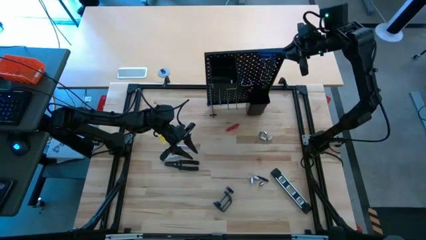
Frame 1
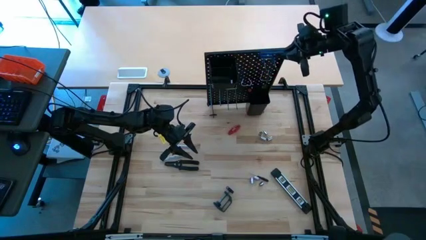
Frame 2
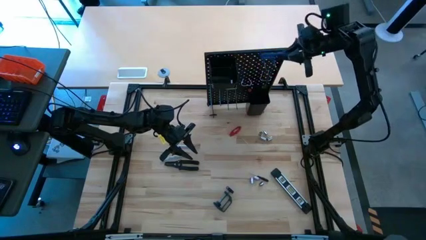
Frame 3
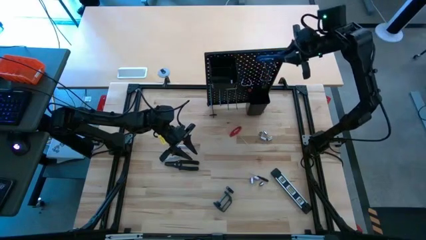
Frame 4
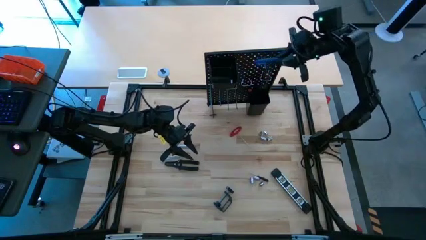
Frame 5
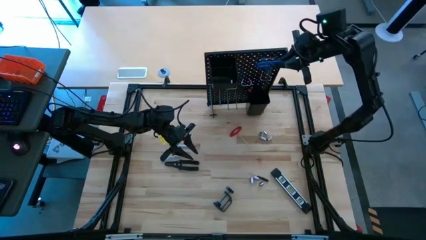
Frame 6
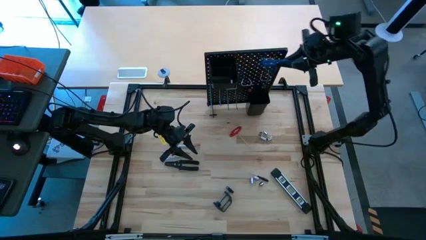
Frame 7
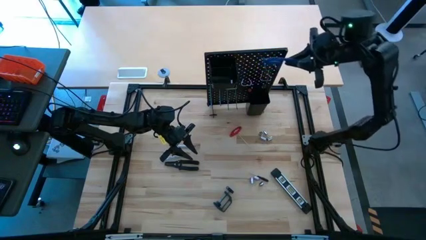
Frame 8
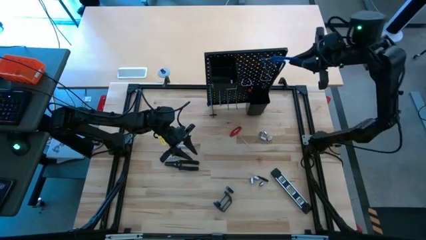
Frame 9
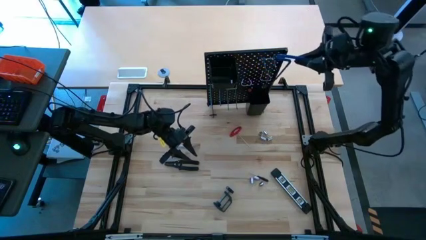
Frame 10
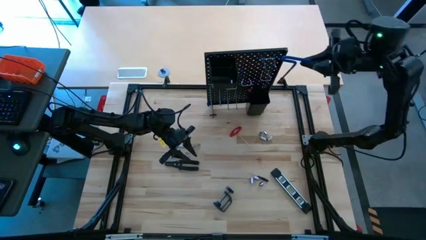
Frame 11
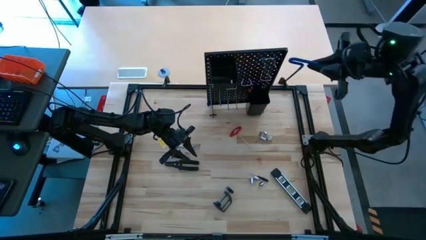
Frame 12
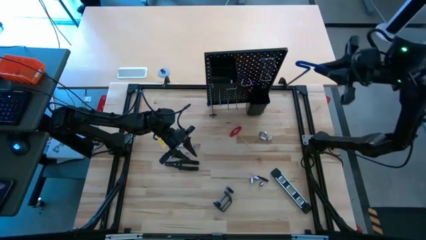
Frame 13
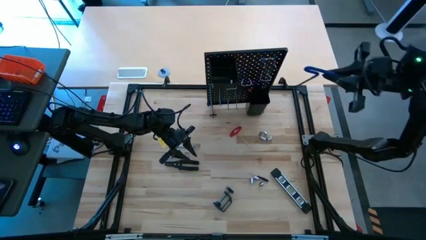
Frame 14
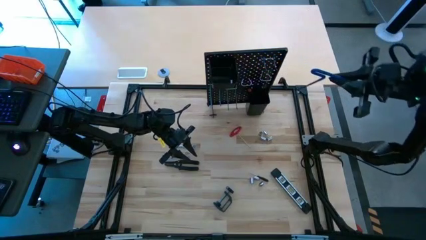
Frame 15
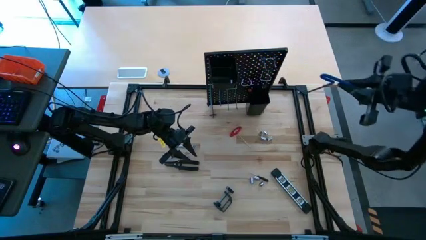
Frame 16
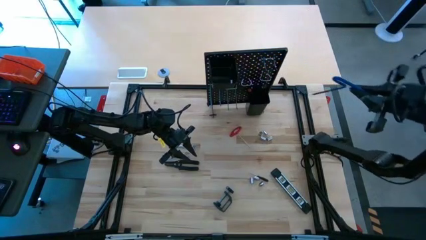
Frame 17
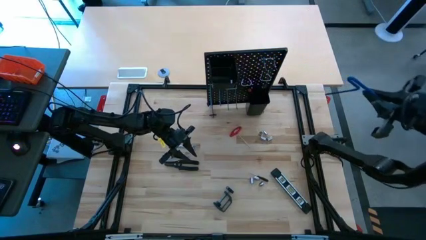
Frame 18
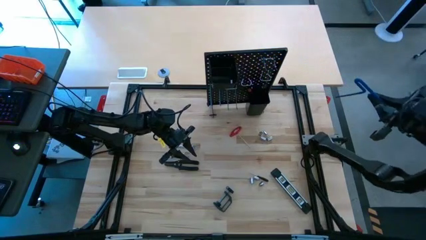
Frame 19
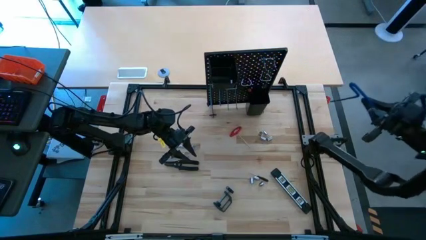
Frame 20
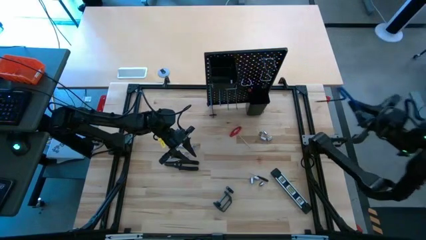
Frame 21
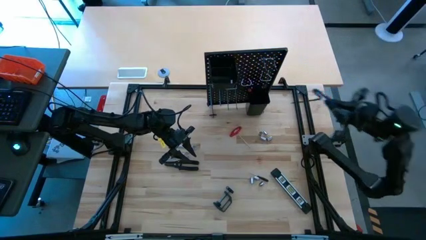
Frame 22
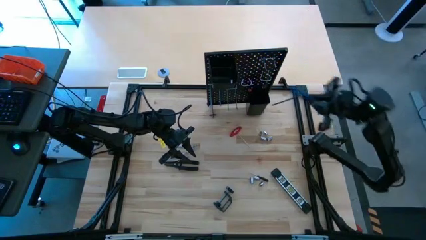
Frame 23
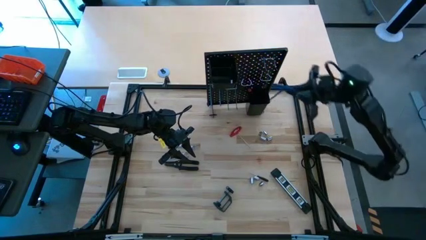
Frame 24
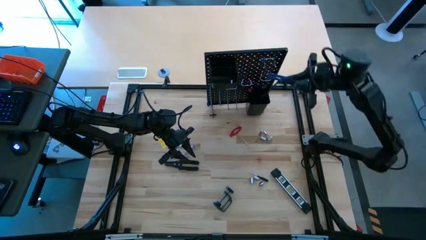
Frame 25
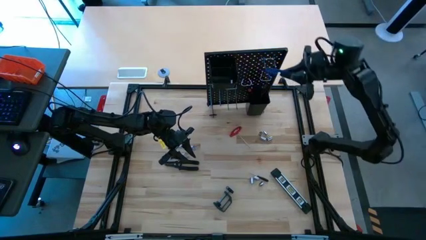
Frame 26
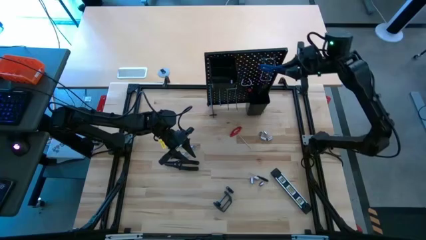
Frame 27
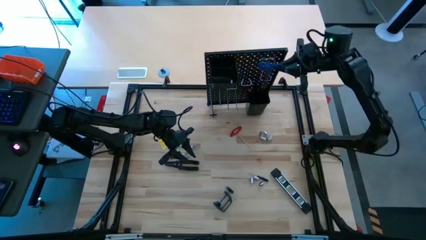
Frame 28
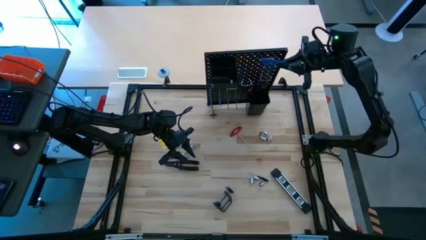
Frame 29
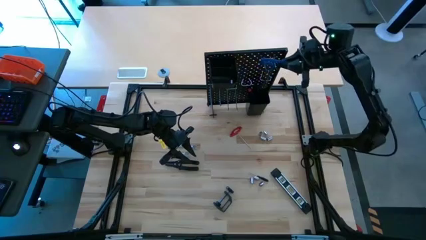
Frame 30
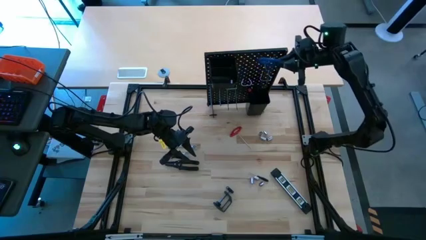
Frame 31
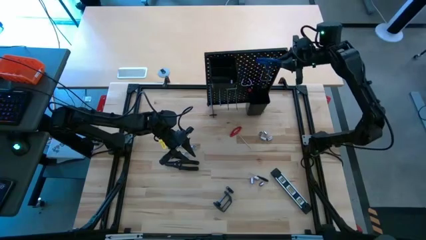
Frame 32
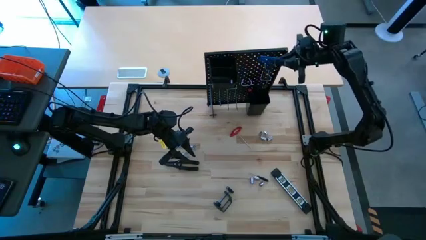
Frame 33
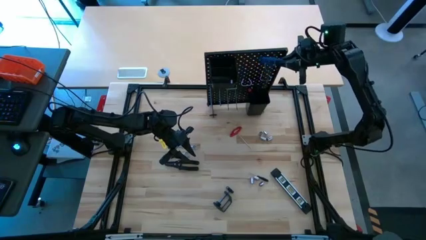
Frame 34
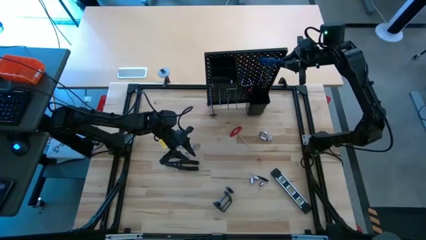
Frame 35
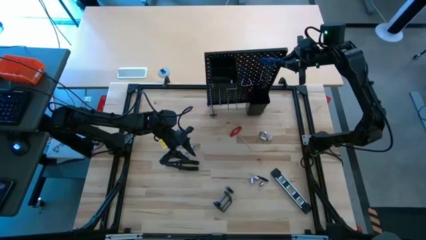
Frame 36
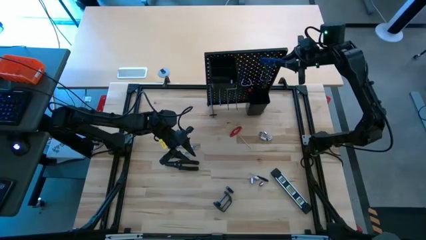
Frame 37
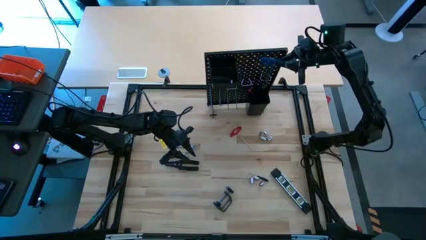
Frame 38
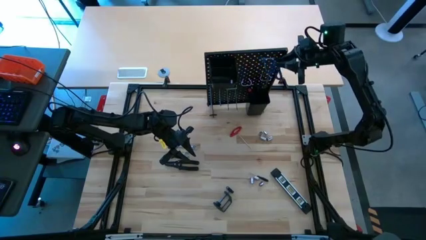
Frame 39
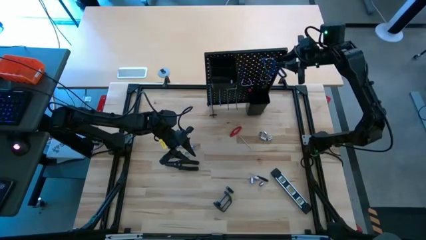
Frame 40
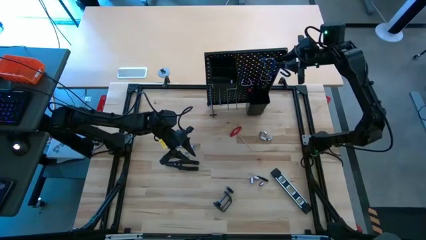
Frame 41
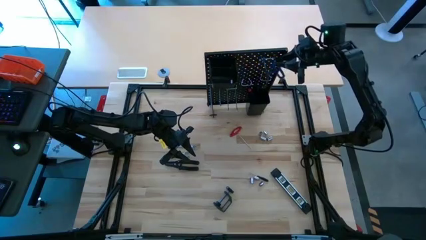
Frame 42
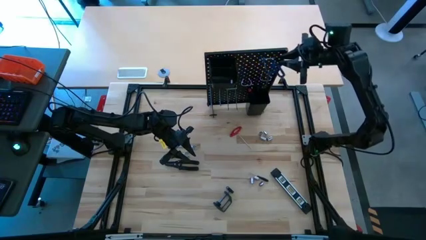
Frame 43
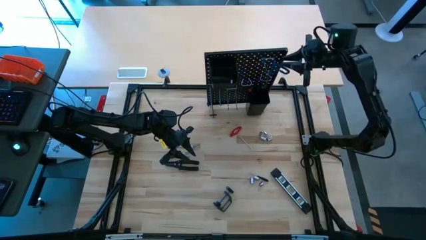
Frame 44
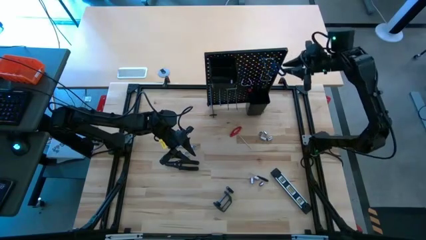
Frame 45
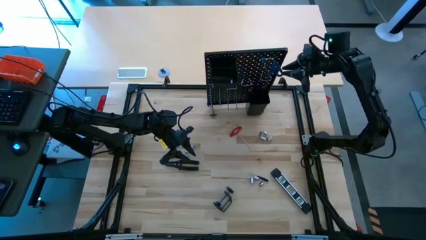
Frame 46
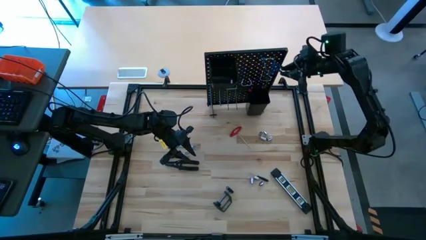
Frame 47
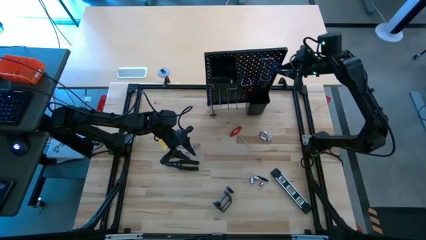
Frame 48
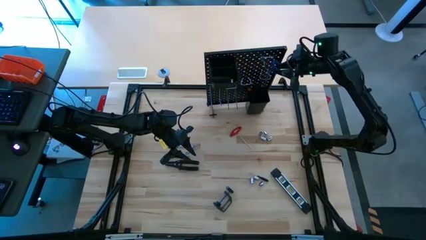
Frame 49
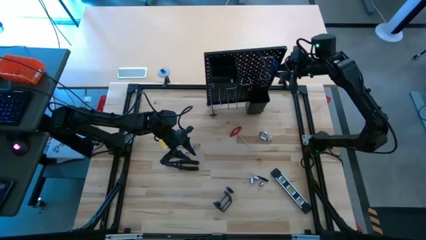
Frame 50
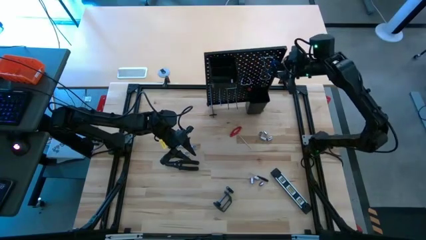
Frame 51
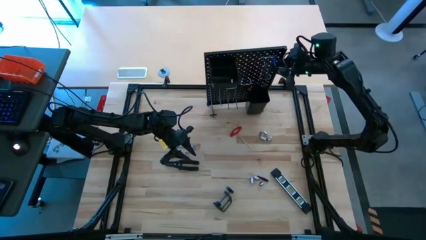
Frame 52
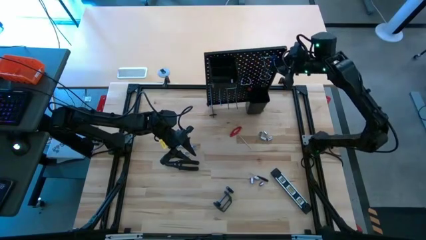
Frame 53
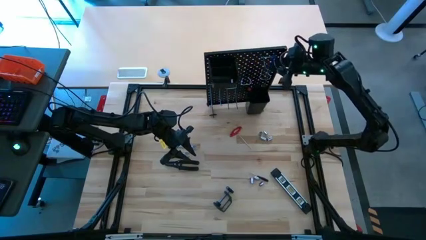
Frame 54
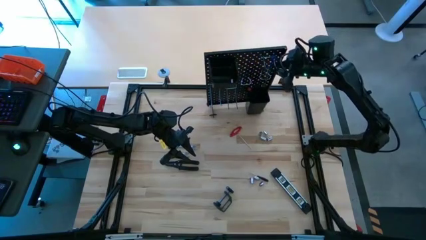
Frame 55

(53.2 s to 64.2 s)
Task: Hang tools onto peg board
Hang the blue pick tool on the top hook on the peg board

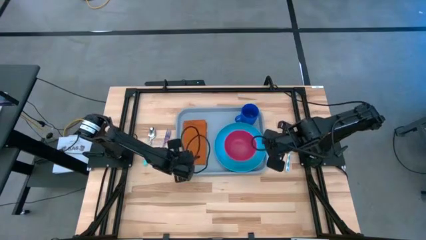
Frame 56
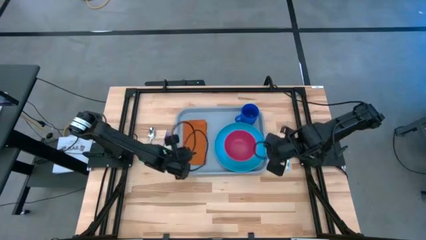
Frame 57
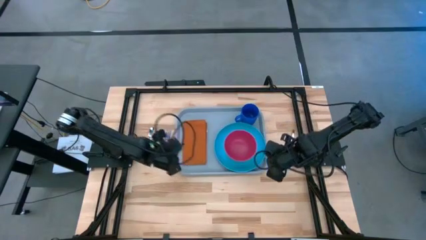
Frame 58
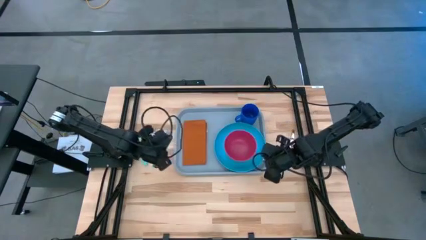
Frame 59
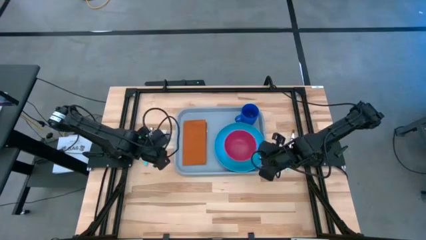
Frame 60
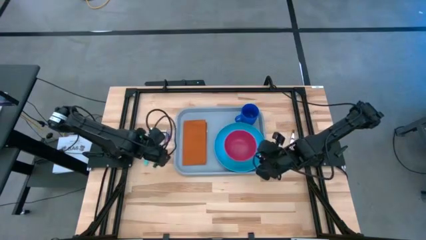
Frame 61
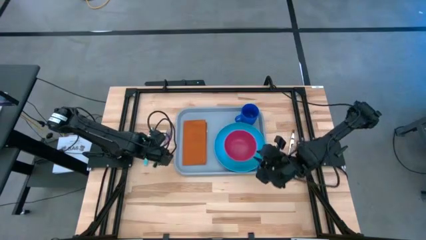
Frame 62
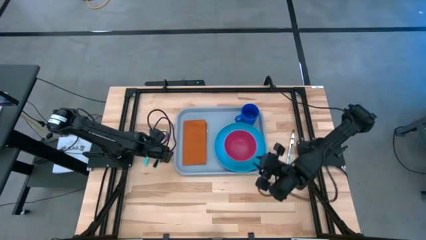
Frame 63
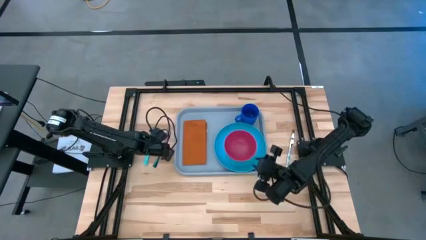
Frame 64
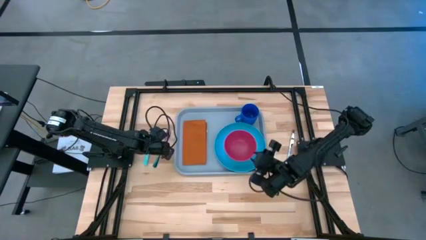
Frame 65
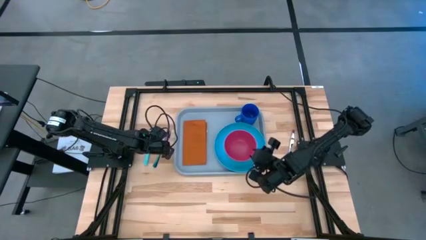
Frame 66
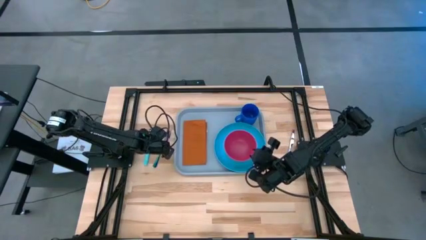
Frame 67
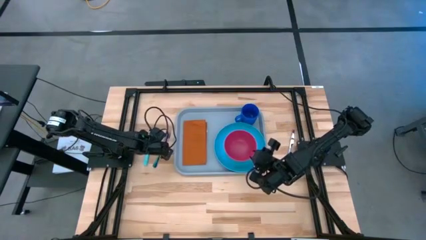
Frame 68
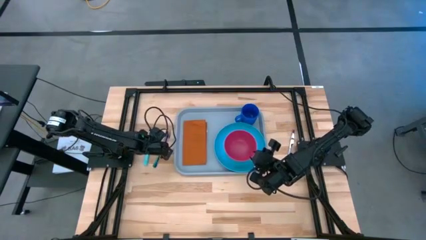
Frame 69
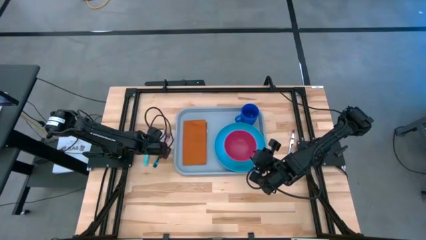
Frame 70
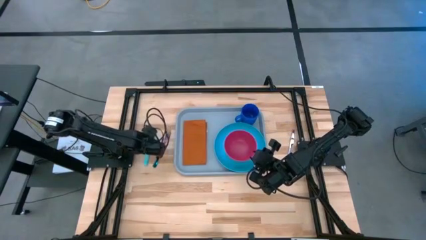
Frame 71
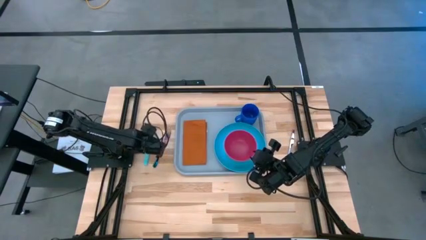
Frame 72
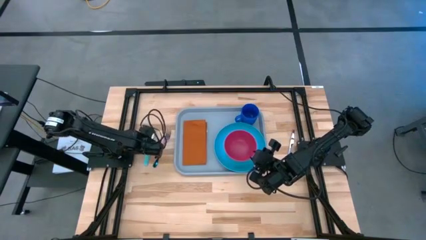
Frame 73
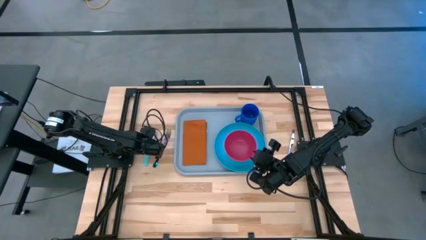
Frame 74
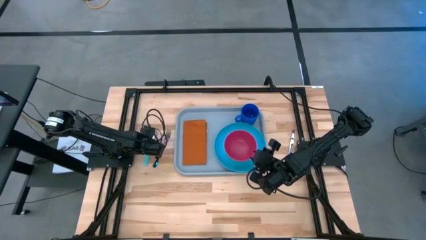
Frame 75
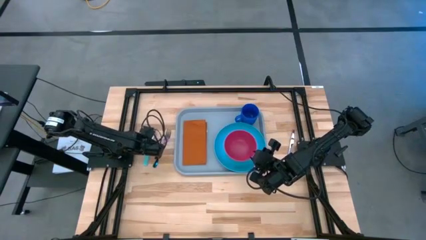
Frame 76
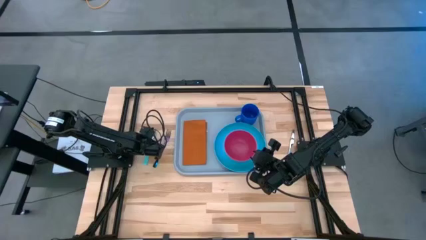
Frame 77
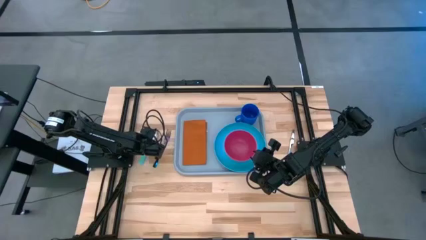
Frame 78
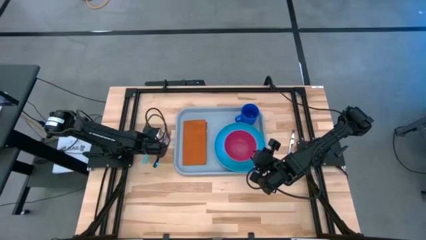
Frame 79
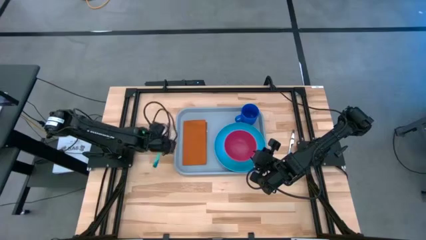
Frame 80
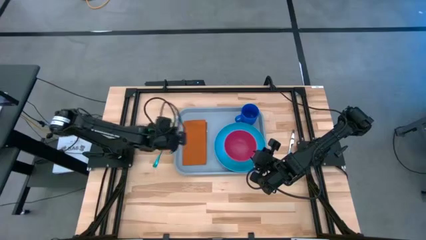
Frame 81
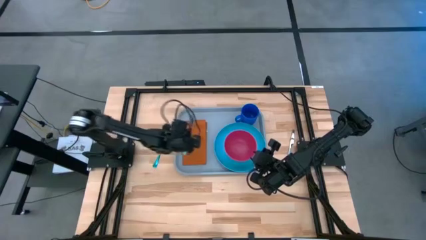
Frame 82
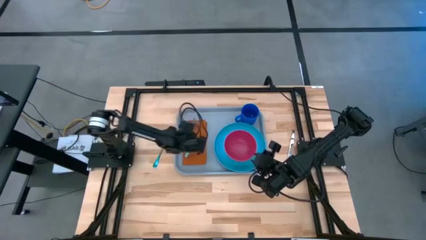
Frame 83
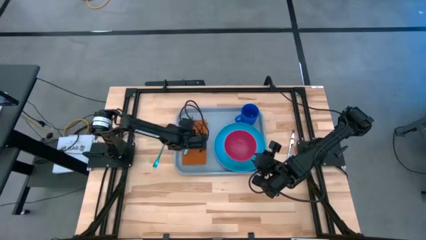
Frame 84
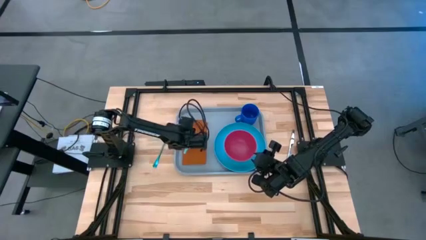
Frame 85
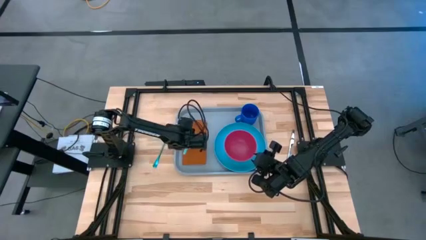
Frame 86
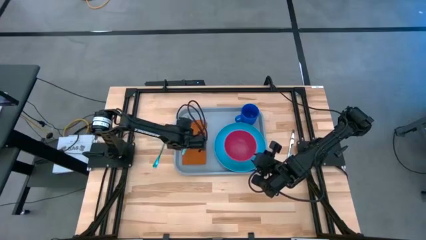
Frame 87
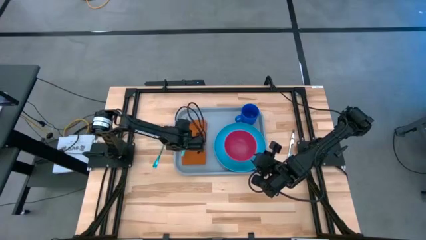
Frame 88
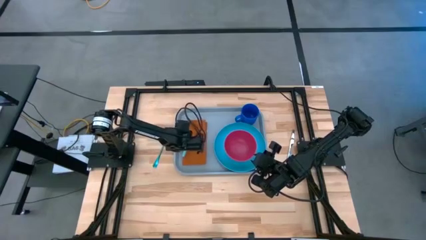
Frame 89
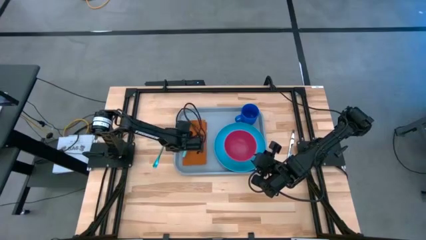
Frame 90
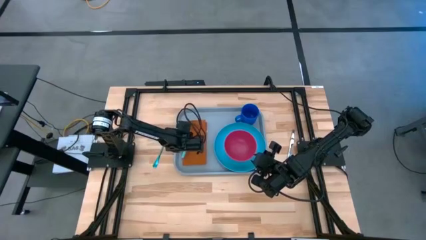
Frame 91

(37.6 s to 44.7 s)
Task: Set up tray
Put the blue spoon on the brown table napkin to the left of the blue plate
